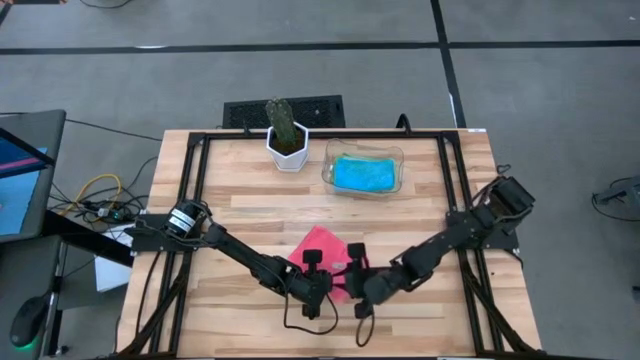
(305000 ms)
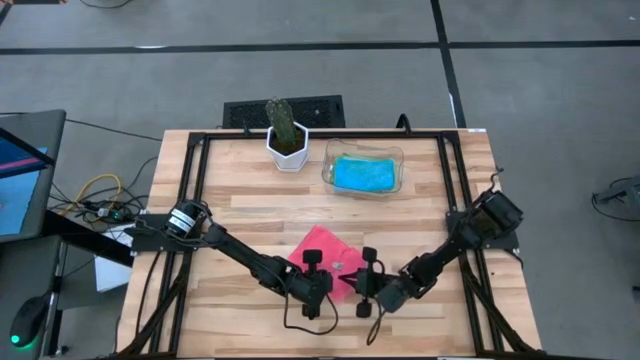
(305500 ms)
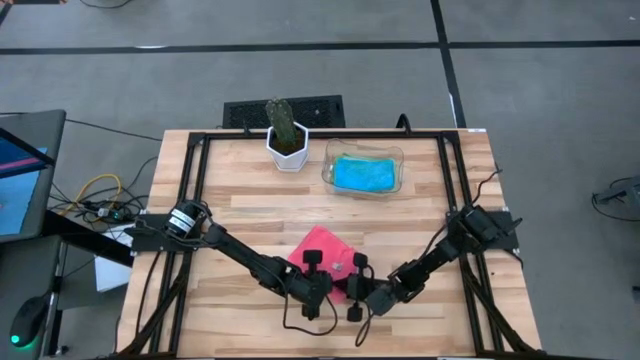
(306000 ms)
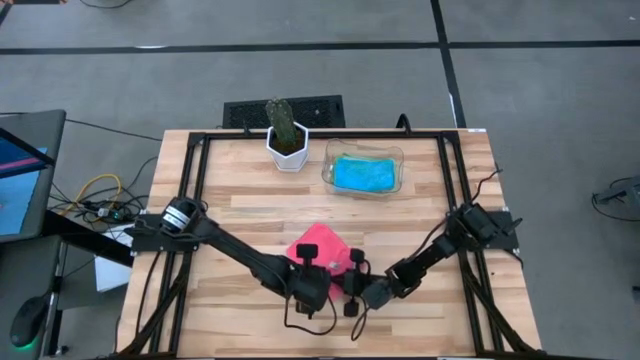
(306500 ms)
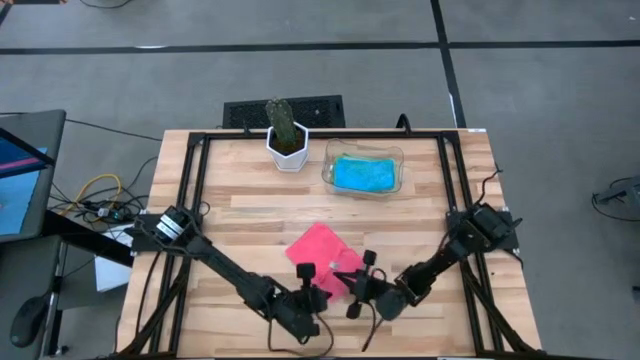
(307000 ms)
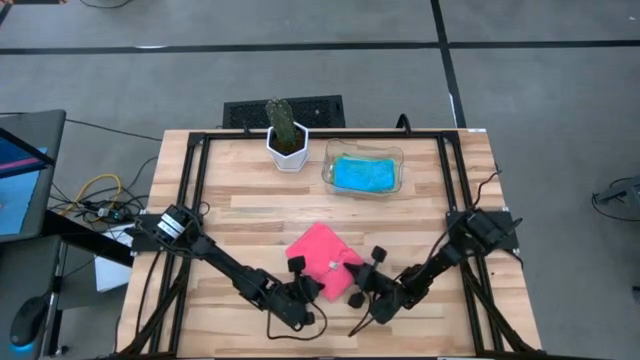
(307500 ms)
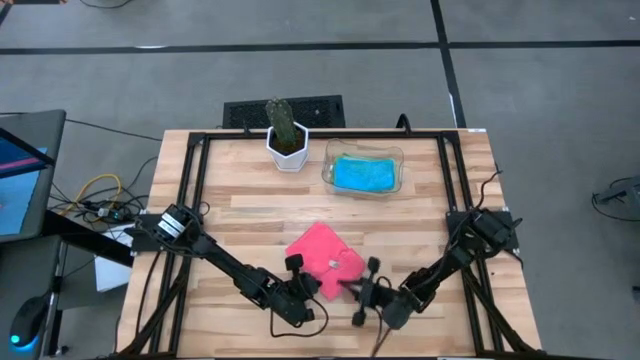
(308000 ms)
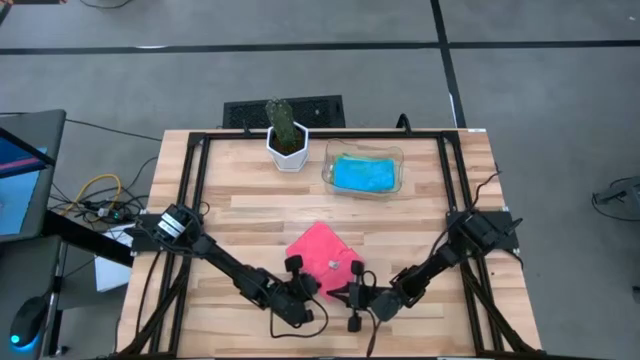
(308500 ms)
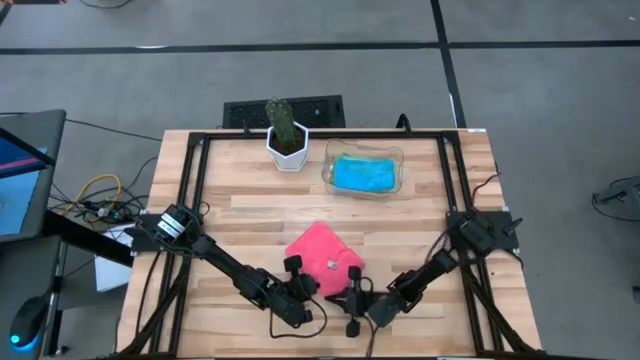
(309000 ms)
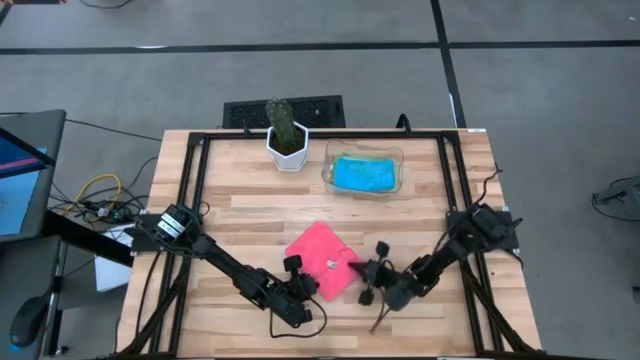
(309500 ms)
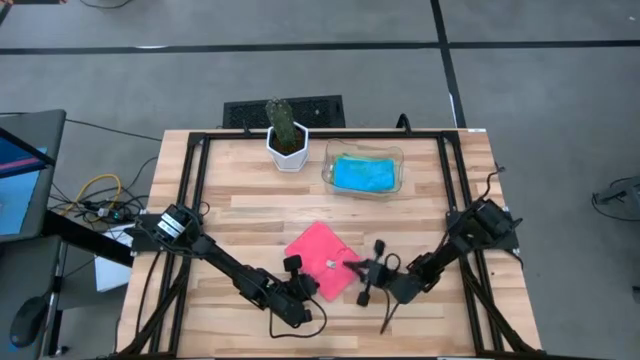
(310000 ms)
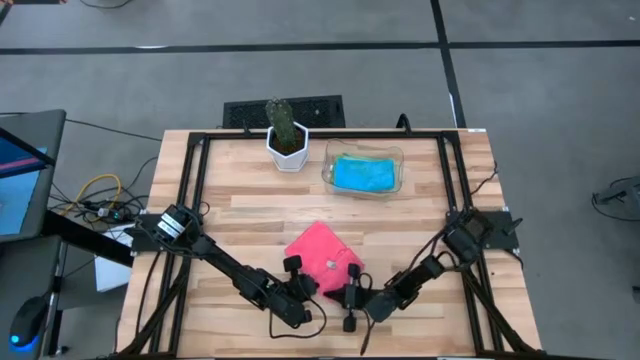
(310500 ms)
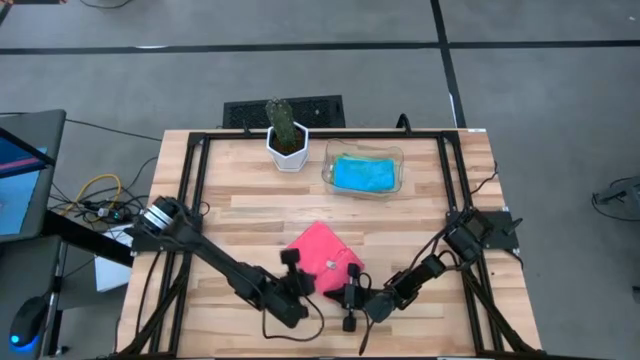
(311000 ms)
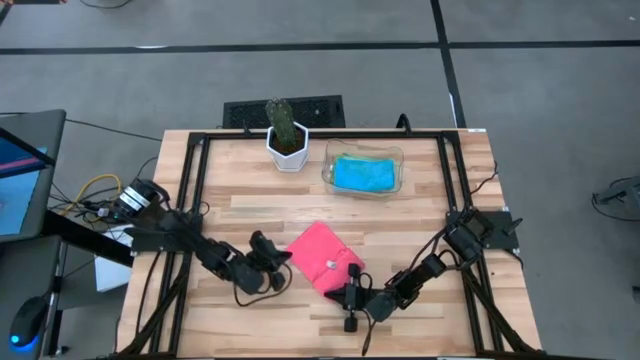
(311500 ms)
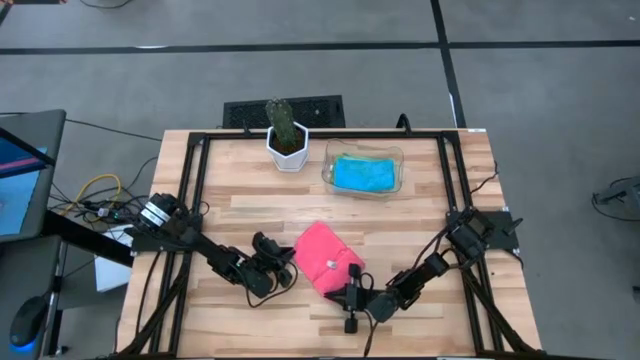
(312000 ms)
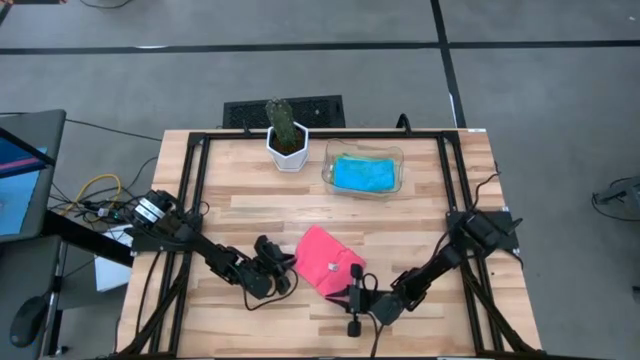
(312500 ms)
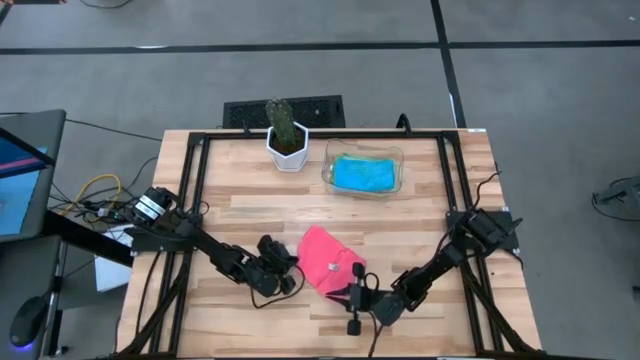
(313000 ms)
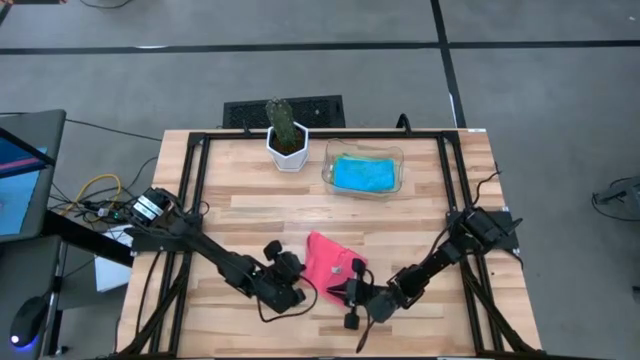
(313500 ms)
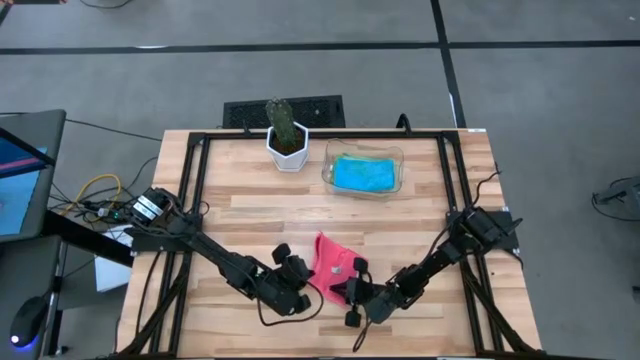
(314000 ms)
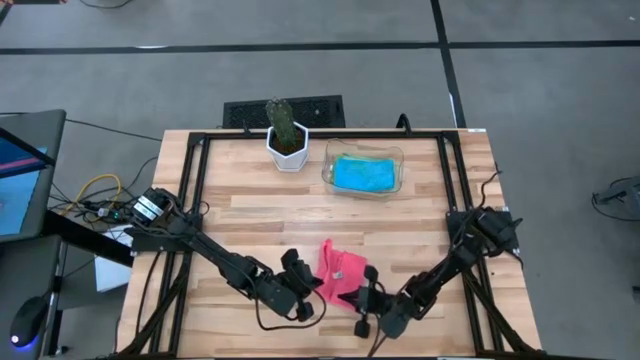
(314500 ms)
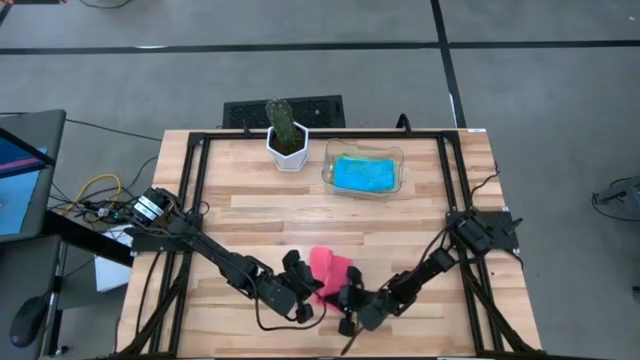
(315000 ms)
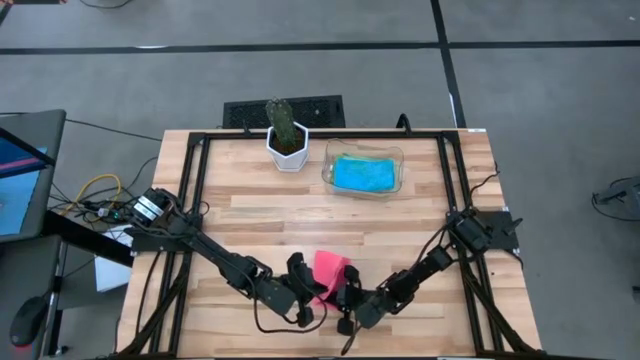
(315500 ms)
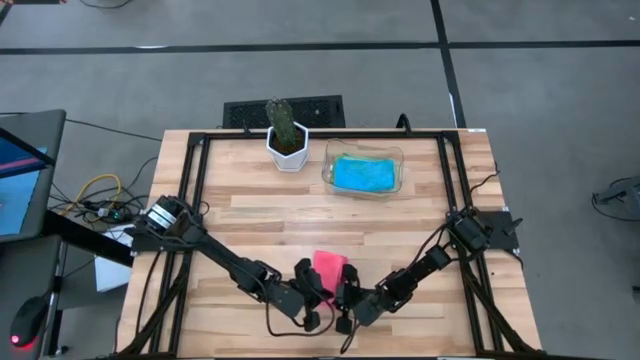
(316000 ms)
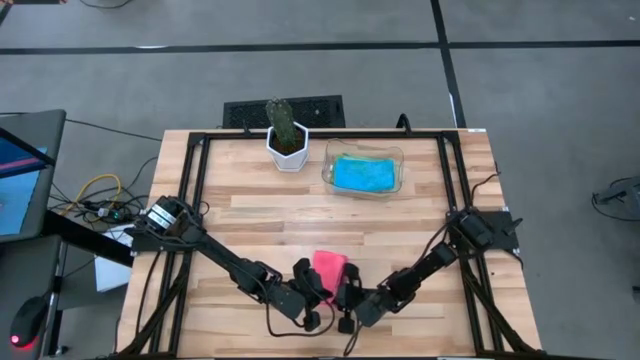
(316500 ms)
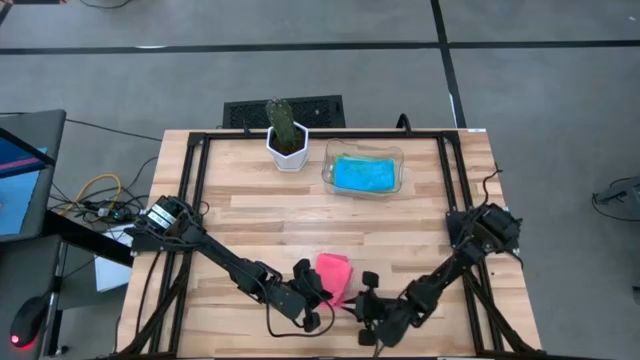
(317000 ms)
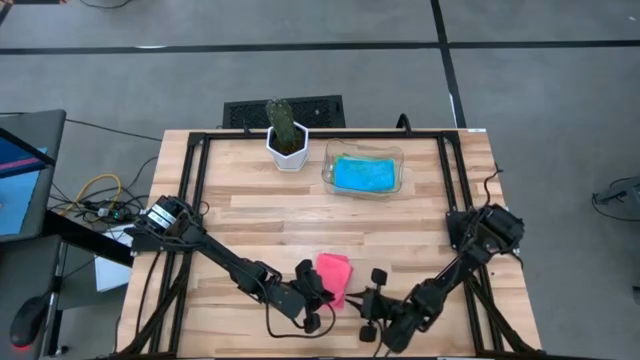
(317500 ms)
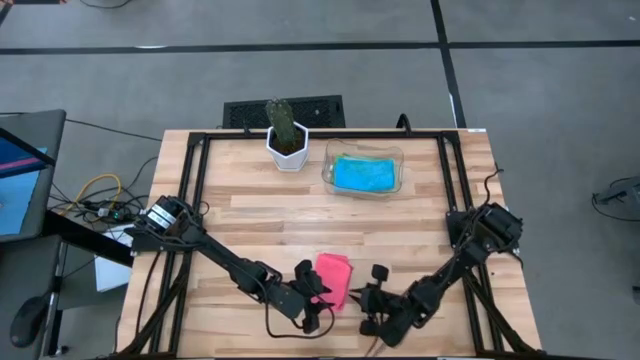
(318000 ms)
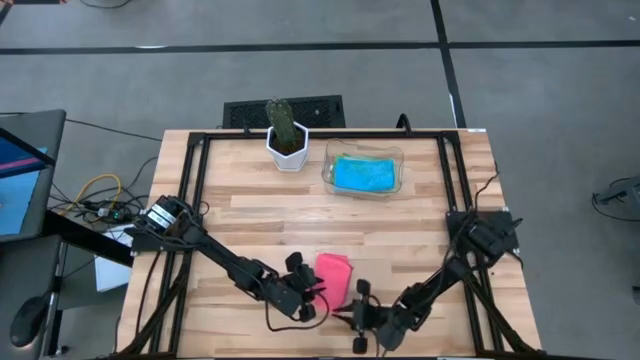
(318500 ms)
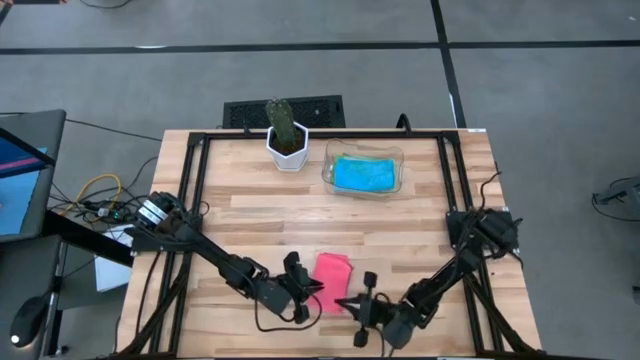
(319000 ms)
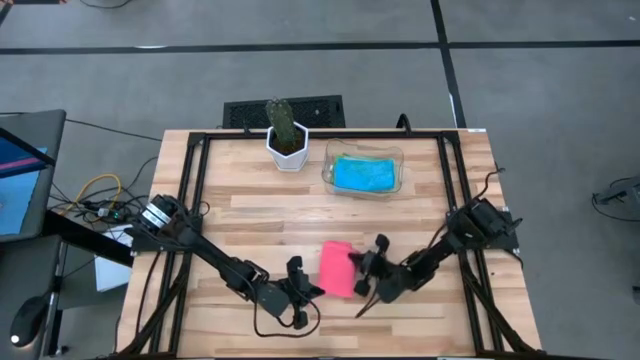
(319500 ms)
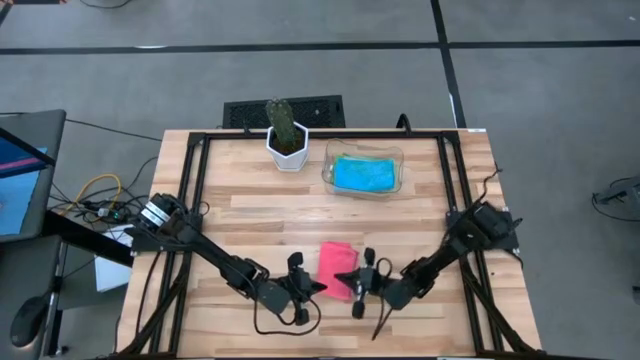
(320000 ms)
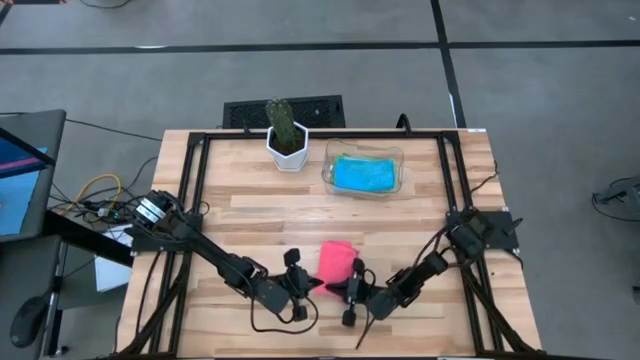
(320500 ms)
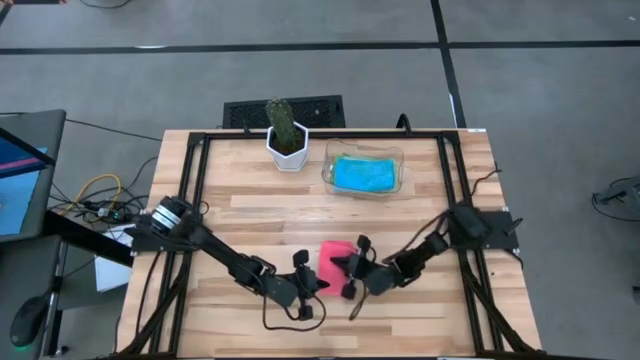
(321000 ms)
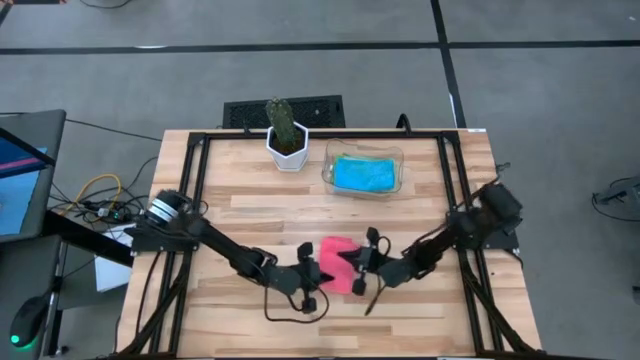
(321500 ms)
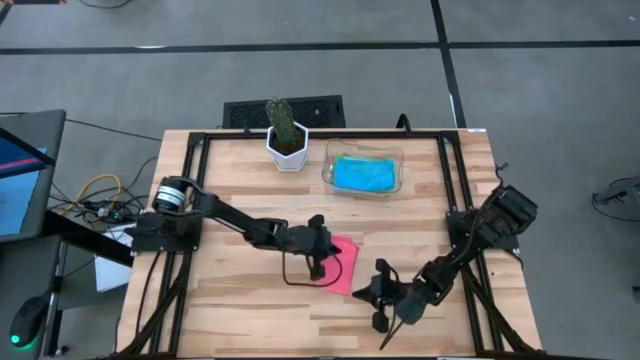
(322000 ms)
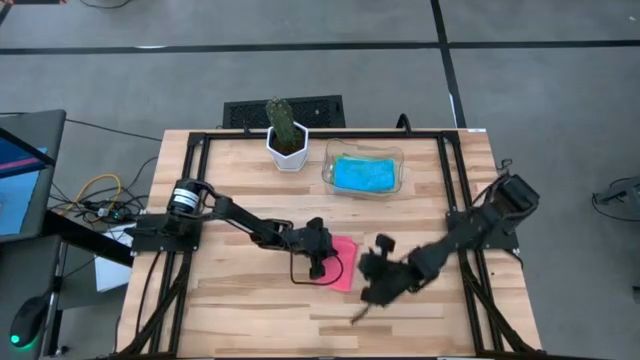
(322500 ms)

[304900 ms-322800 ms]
Task: Fold microfiber towels
Fold the pink towel

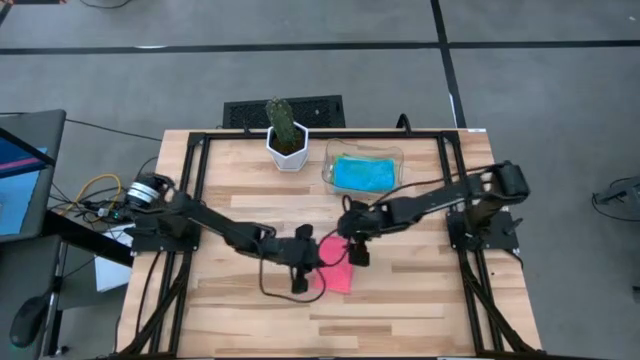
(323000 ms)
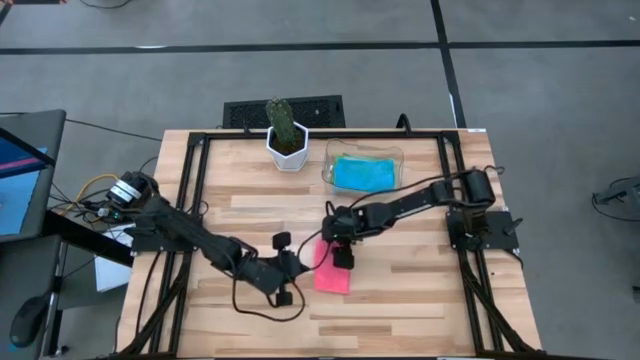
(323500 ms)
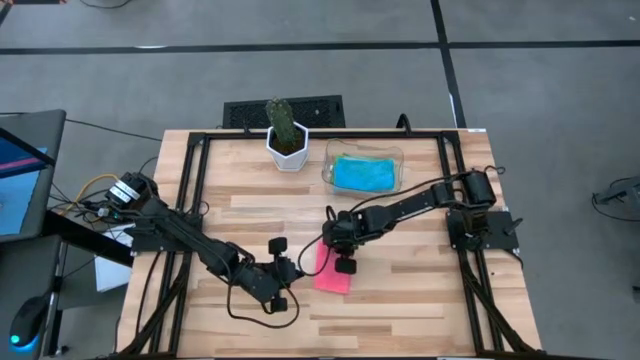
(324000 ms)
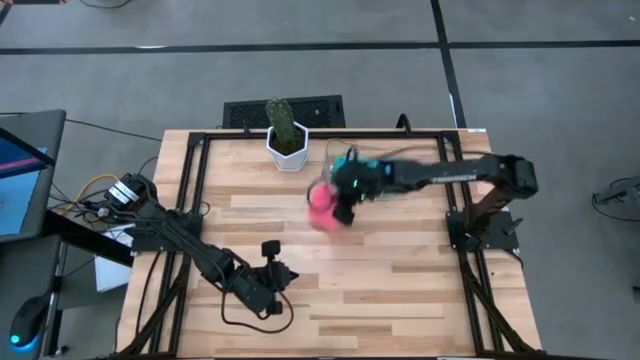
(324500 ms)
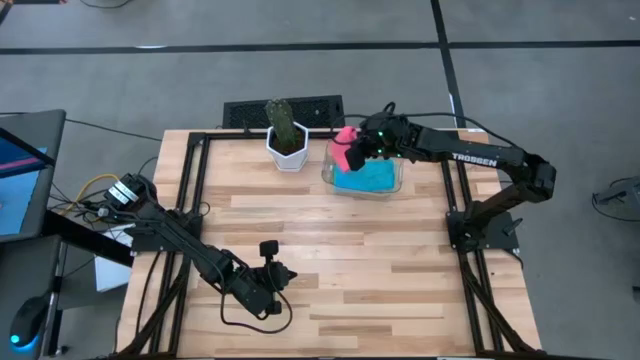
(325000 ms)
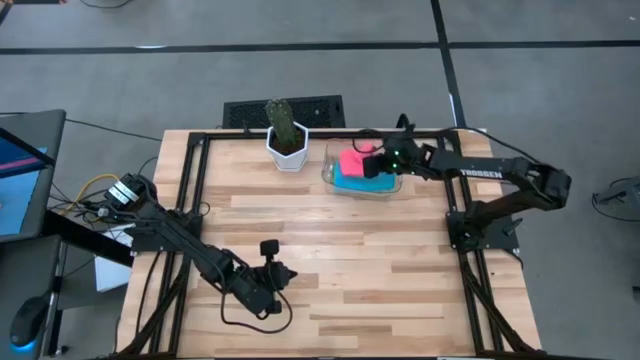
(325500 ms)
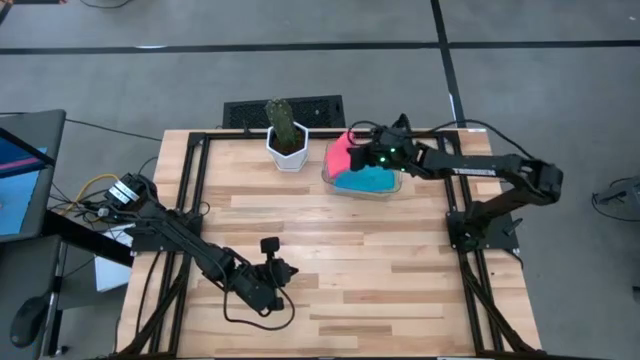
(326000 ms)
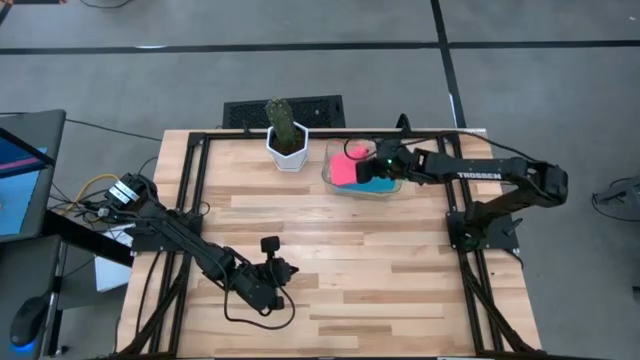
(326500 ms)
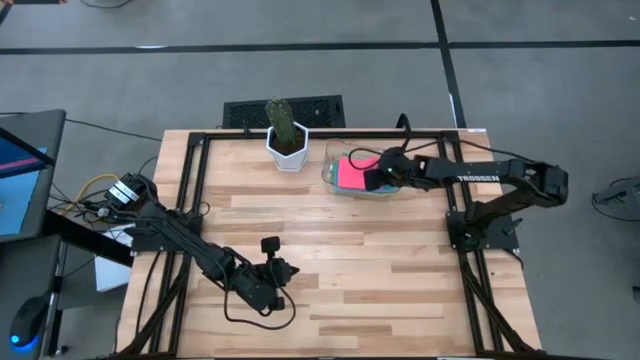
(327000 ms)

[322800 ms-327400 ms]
Put the folded pink towel into the transparent bin
